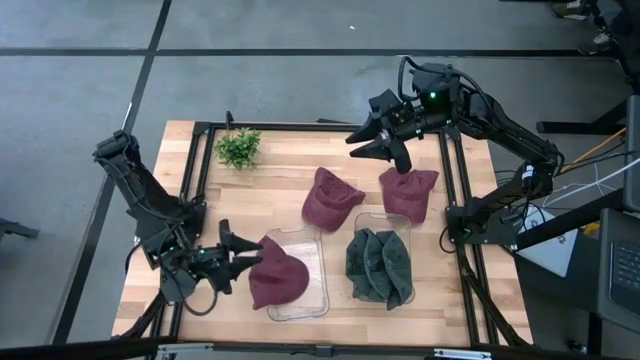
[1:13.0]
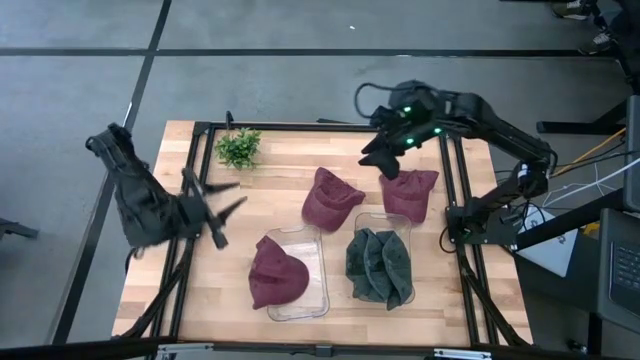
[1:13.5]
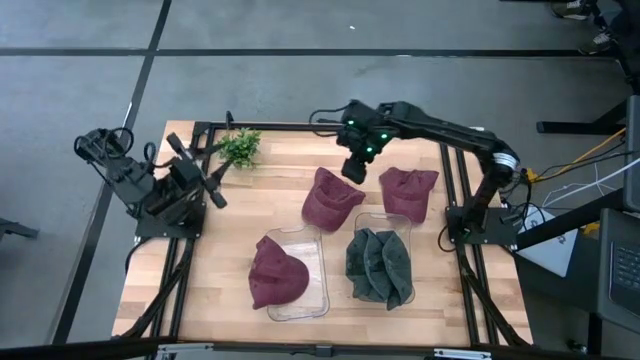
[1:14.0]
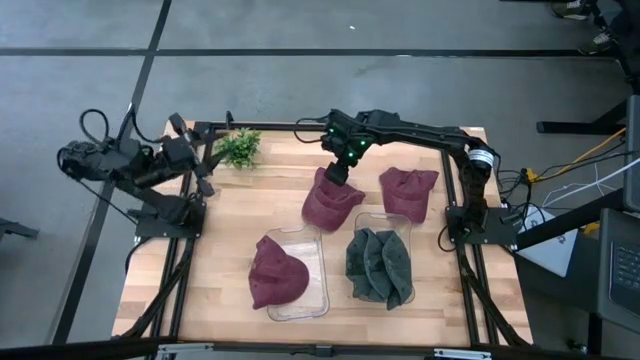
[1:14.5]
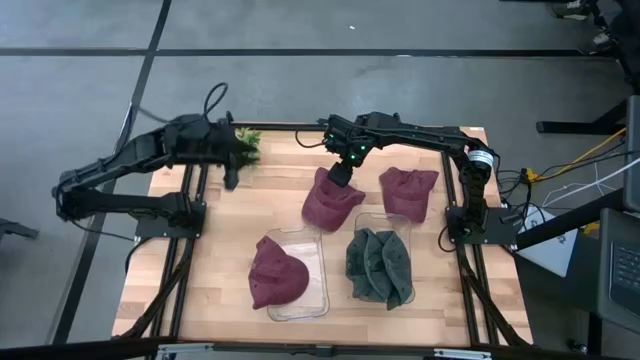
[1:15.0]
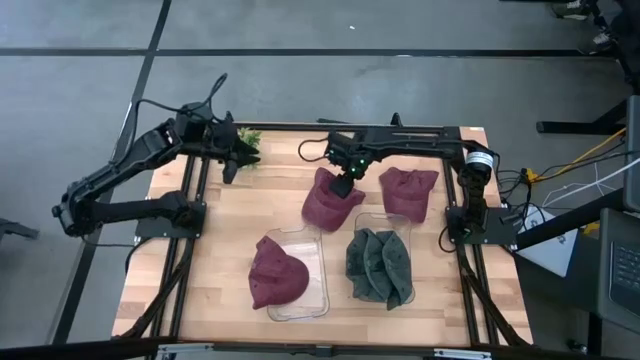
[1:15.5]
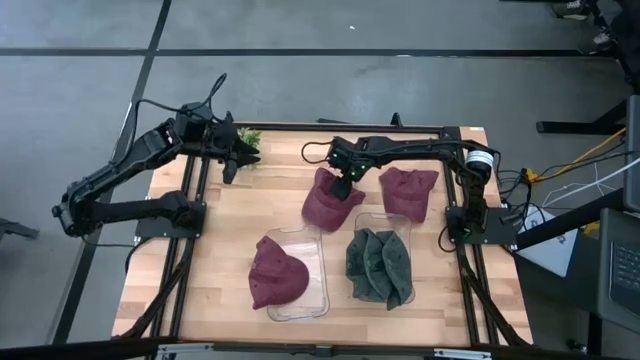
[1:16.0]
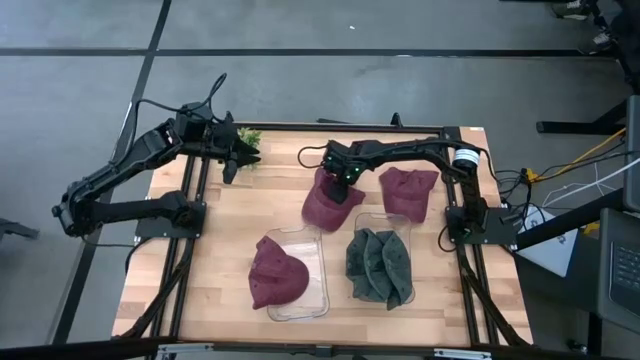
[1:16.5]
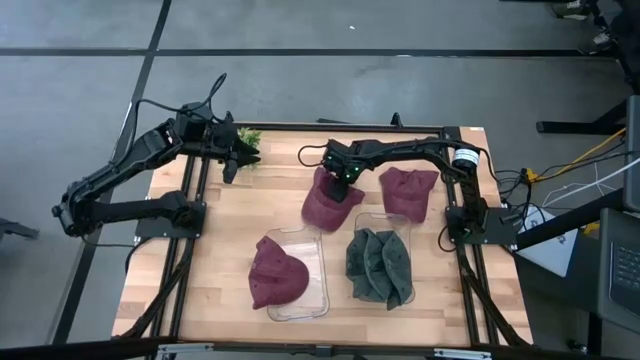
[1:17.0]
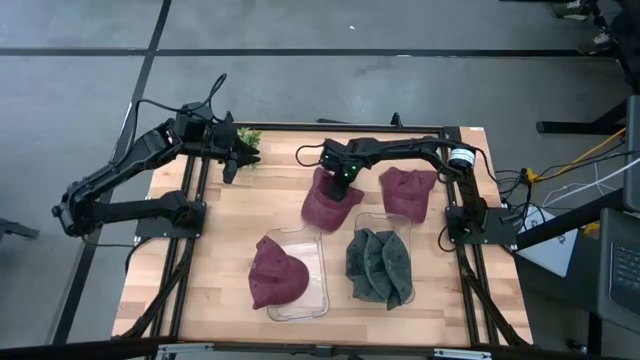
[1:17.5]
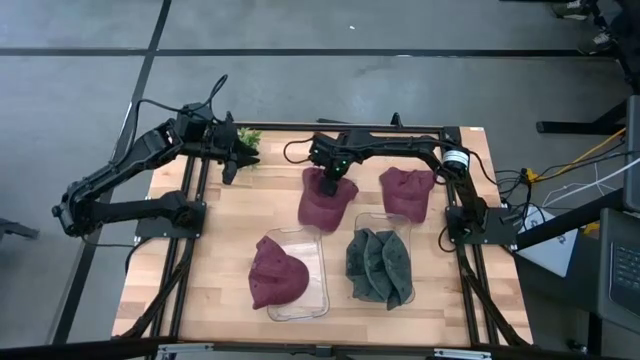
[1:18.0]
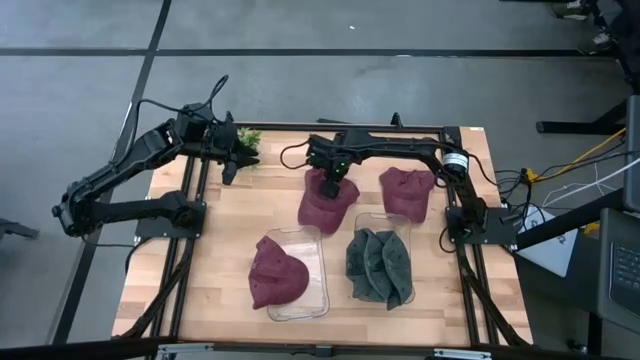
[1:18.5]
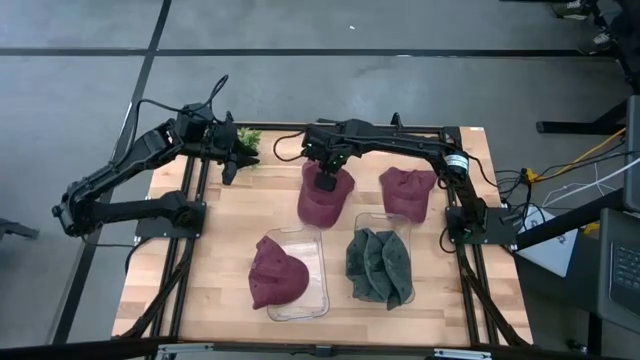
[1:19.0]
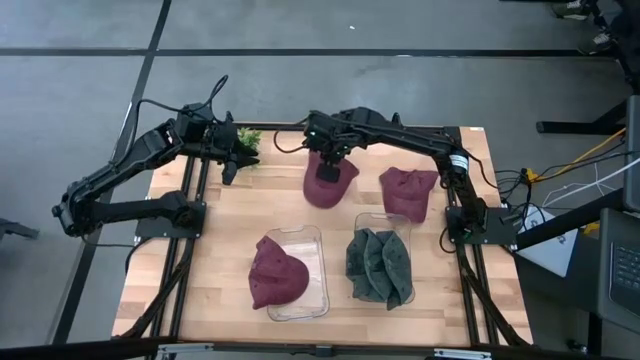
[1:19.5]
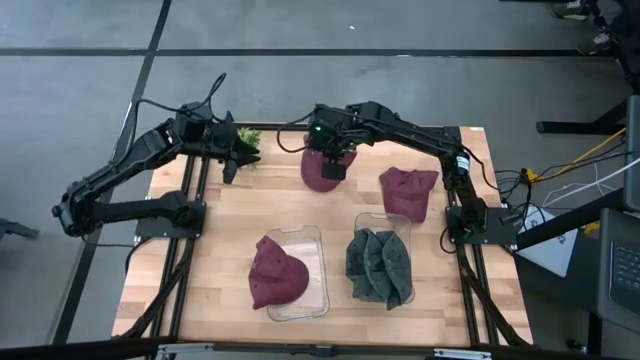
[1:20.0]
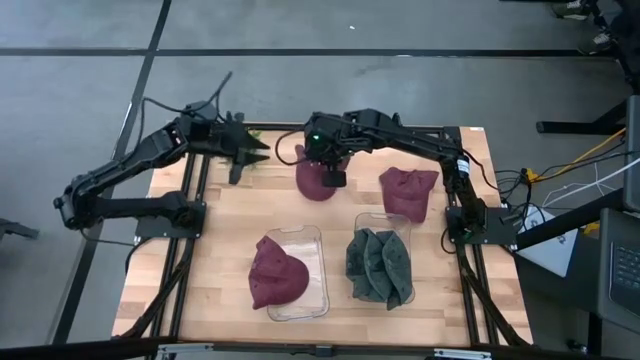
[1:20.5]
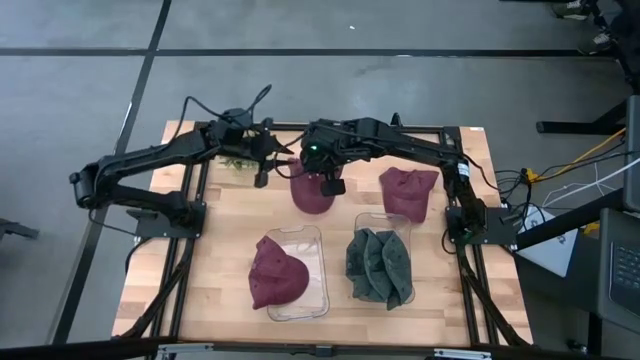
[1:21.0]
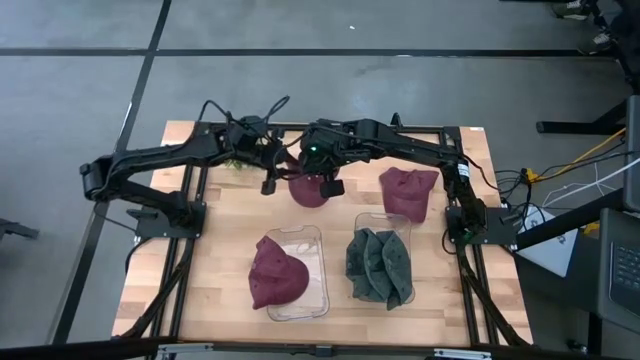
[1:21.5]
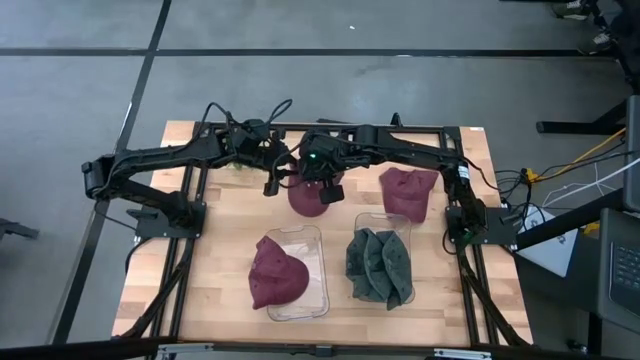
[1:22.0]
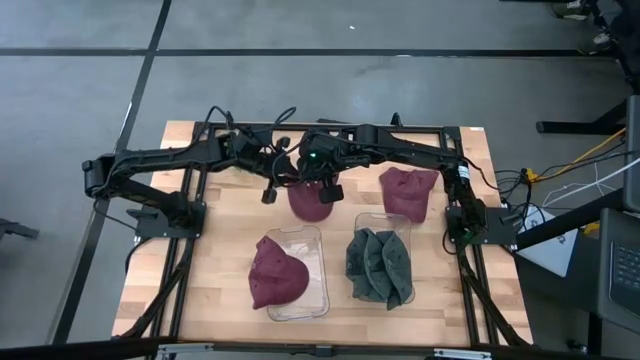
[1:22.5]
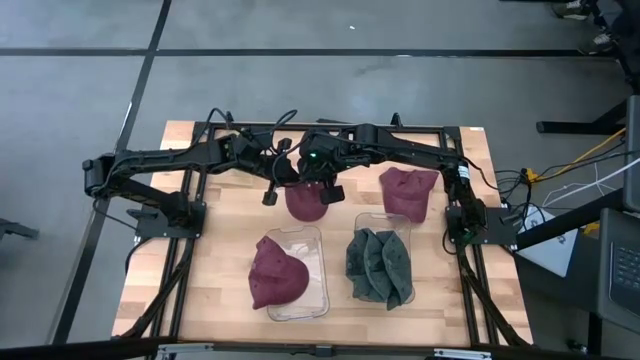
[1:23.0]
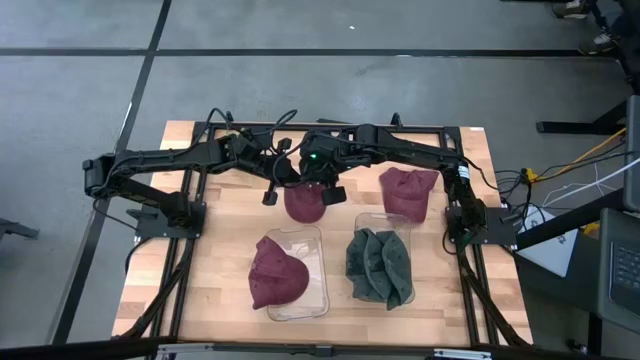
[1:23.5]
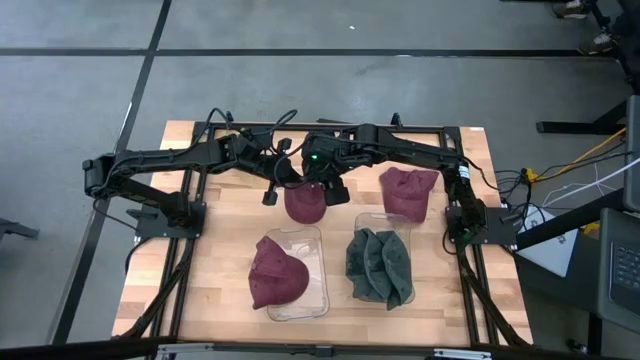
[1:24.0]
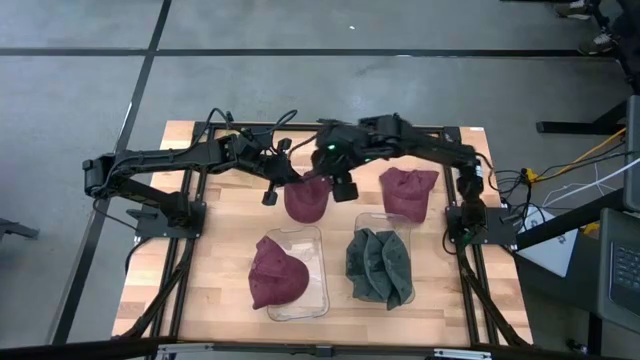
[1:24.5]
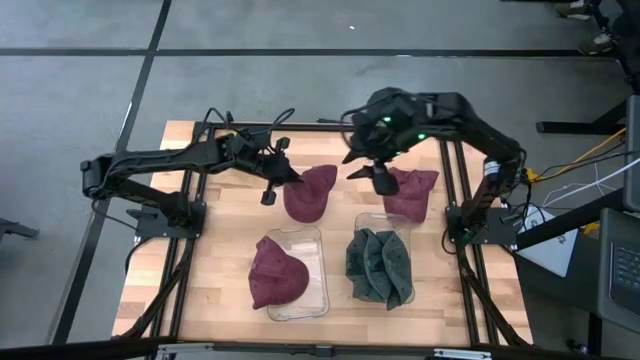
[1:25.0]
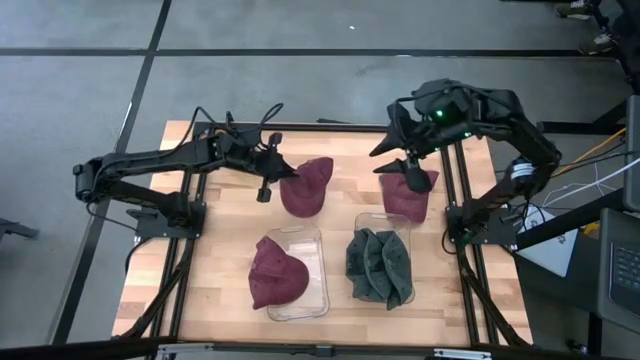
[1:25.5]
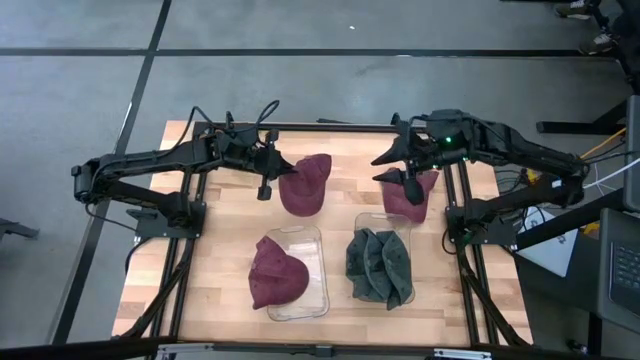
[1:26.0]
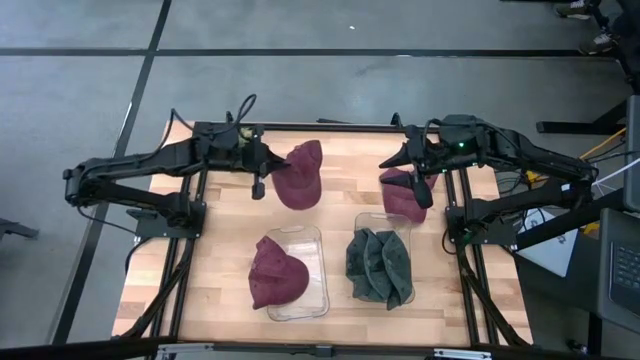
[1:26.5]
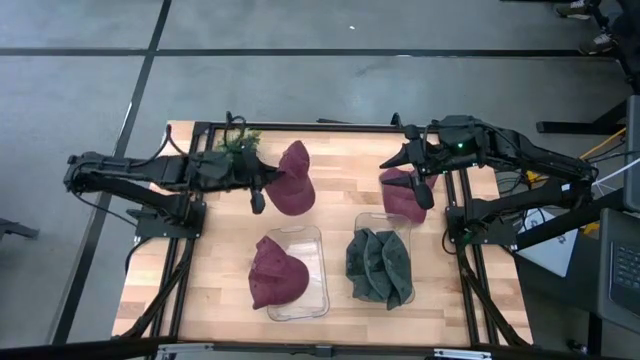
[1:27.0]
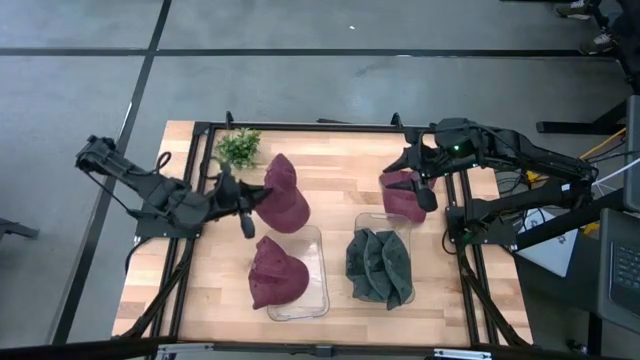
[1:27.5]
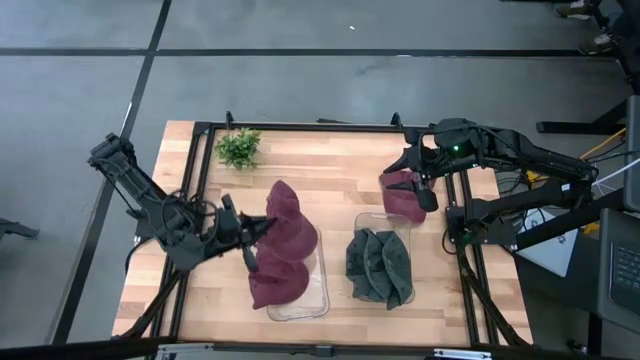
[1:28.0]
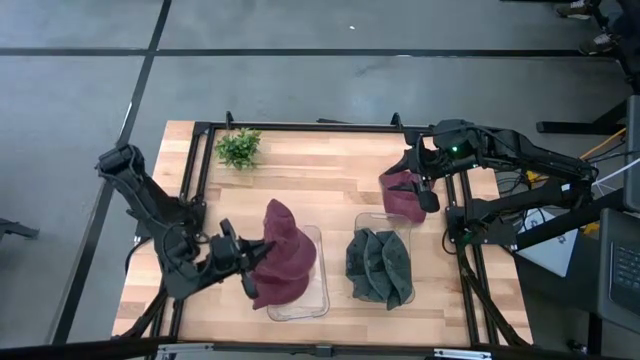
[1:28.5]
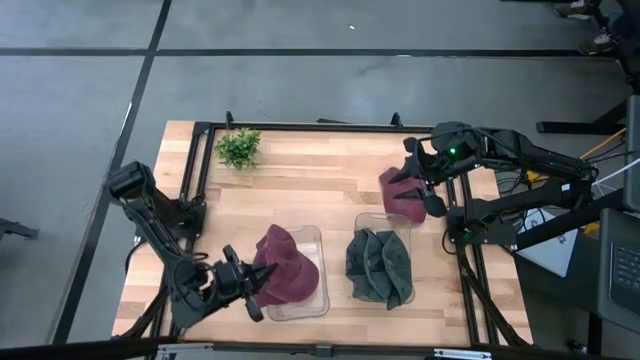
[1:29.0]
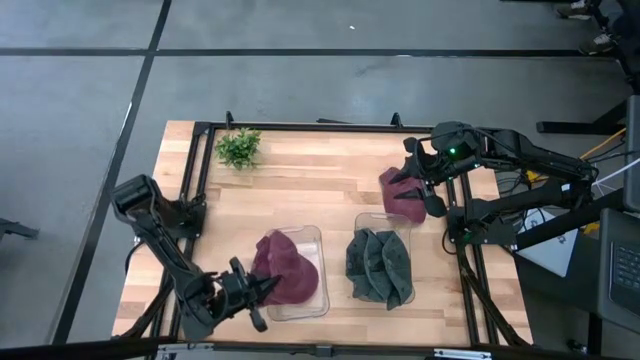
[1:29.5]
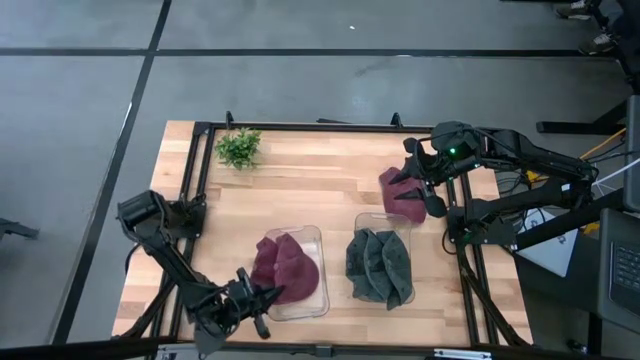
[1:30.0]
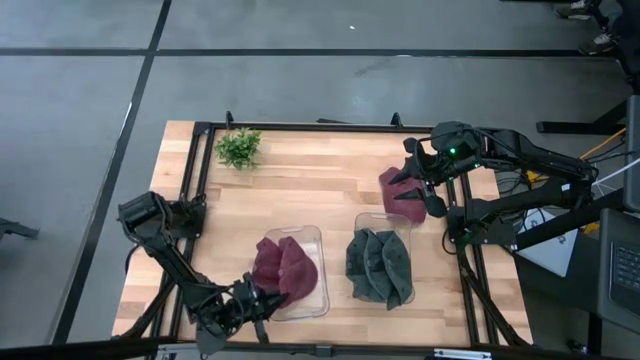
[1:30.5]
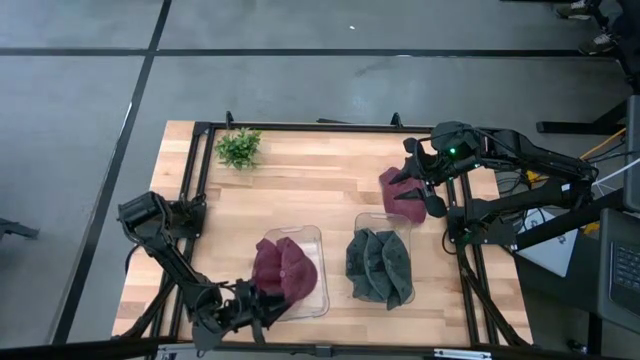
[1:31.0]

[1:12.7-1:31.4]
Task: Pick & Place hat
Put the left pink cap into the left transparent bin
